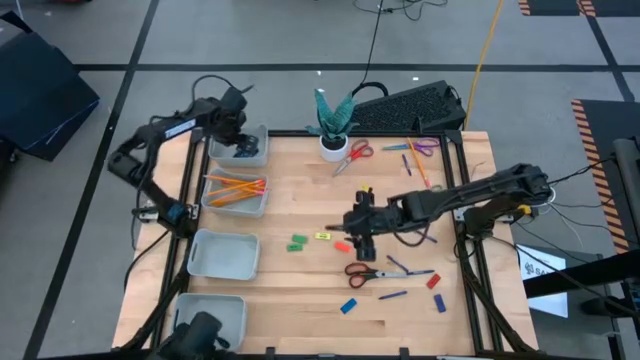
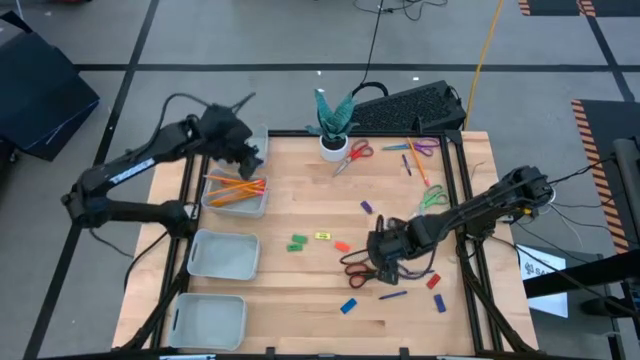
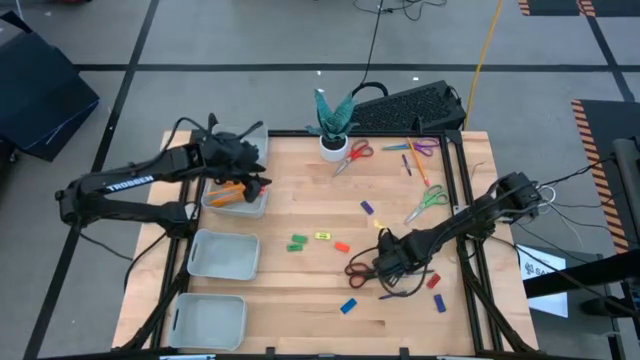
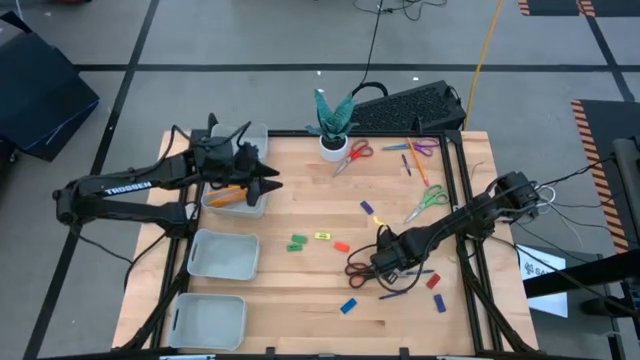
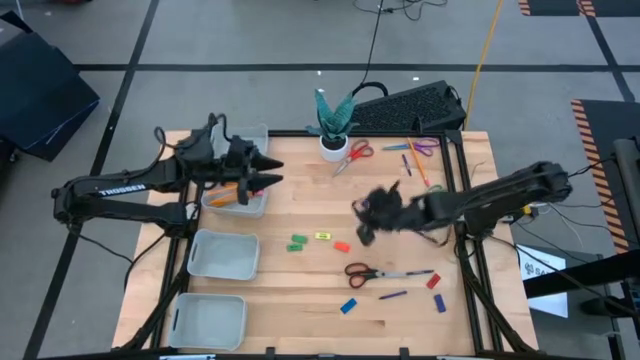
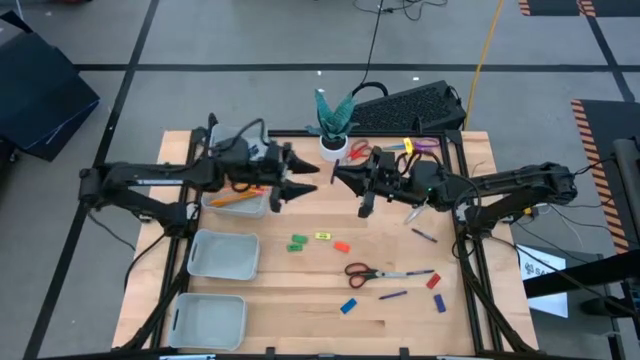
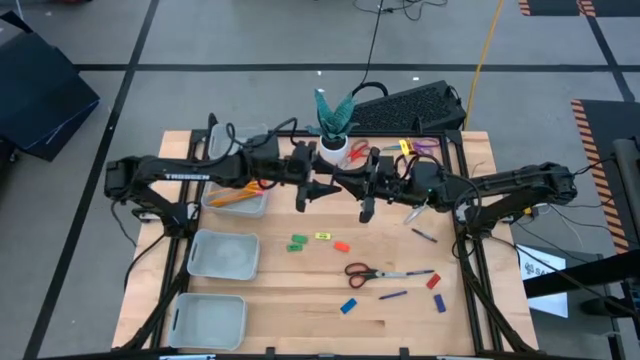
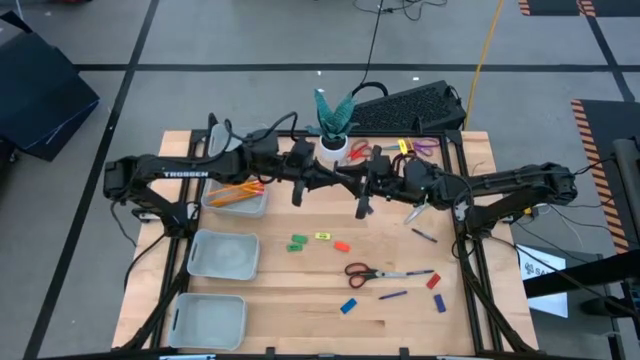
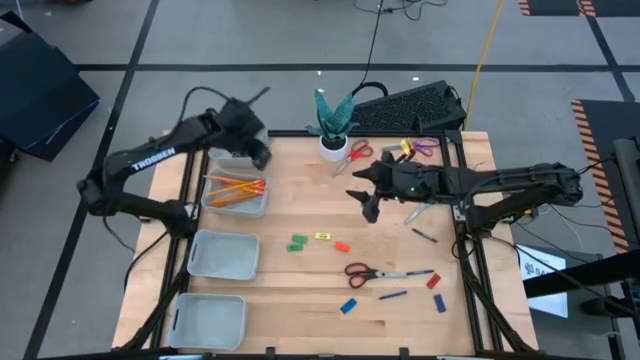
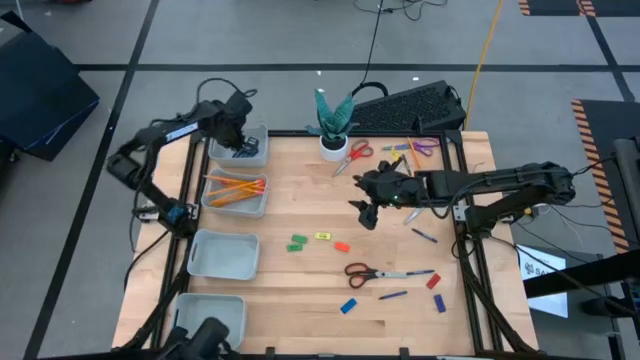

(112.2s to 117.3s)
Task: Sort crayons/erasers/pens/pencils in bins
Put the blue crayon into the top gray bin

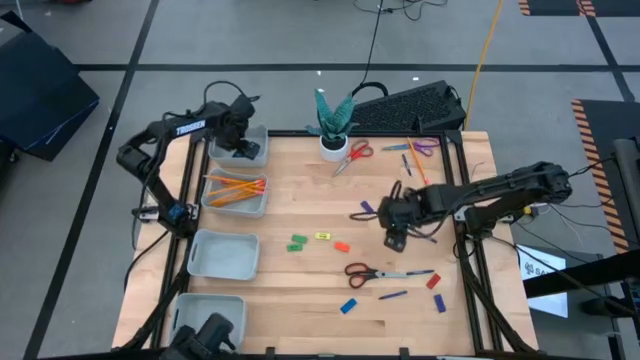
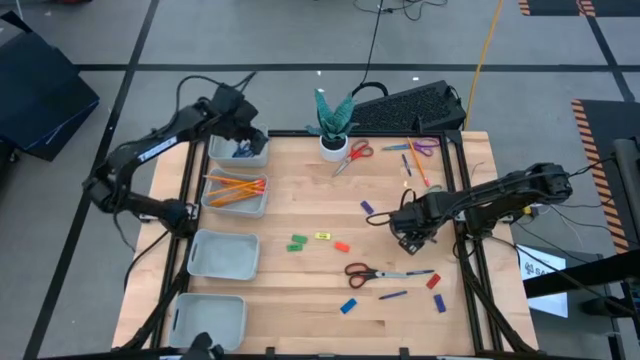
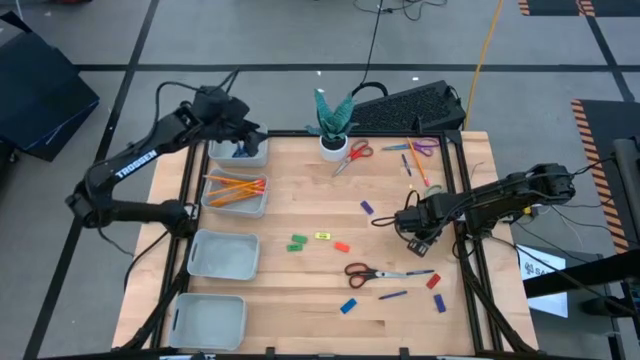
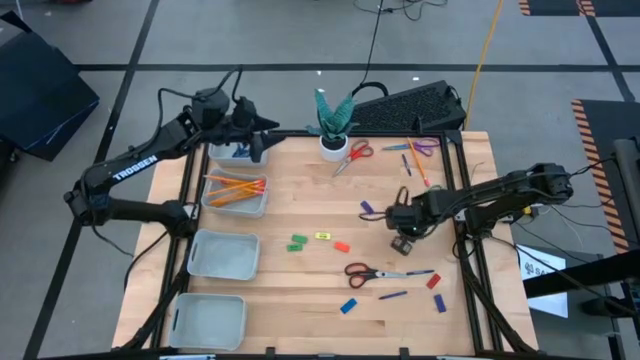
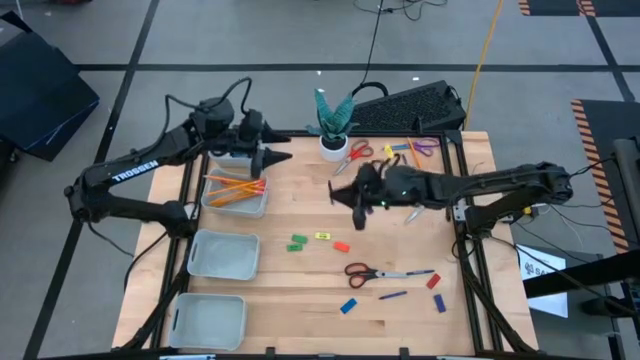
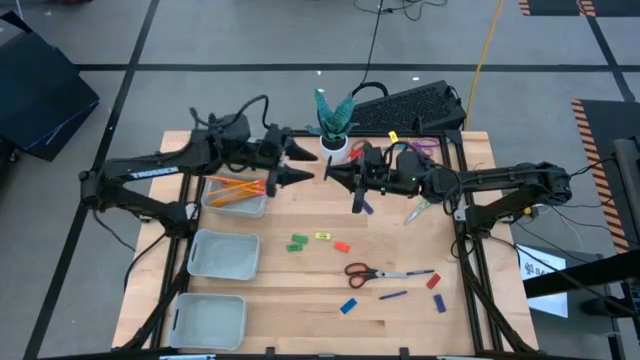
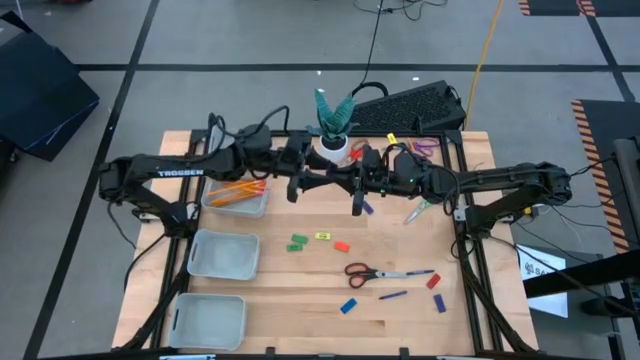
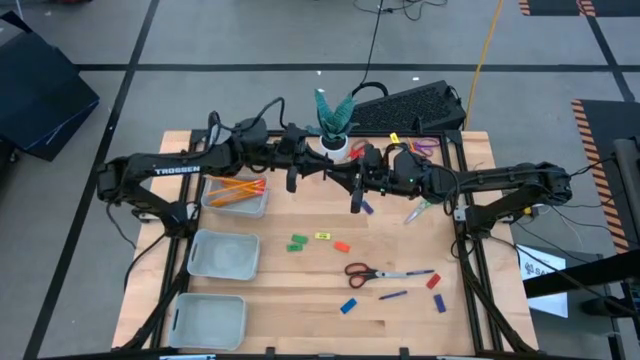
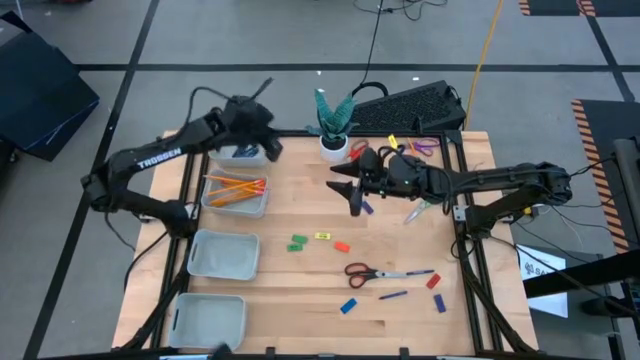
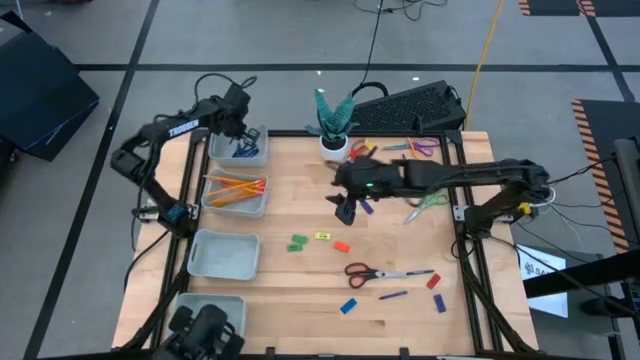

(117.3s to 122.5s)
Put the blue crayon into the top gray bin

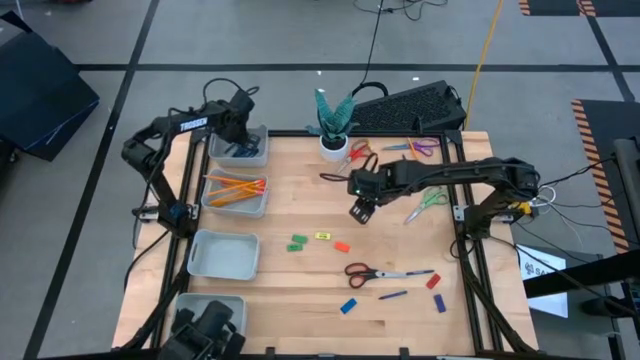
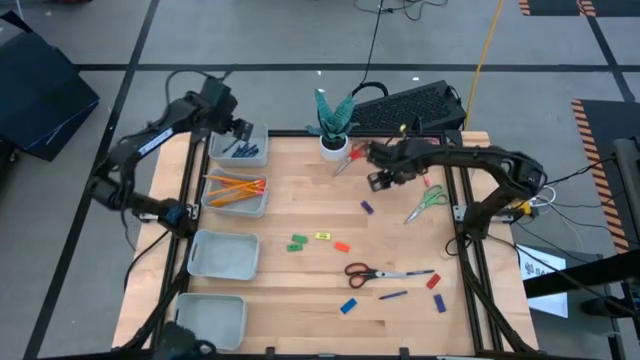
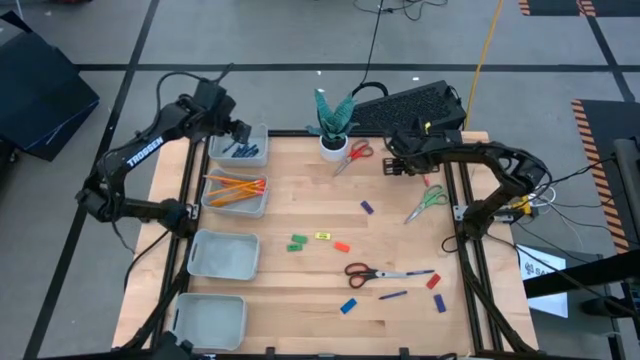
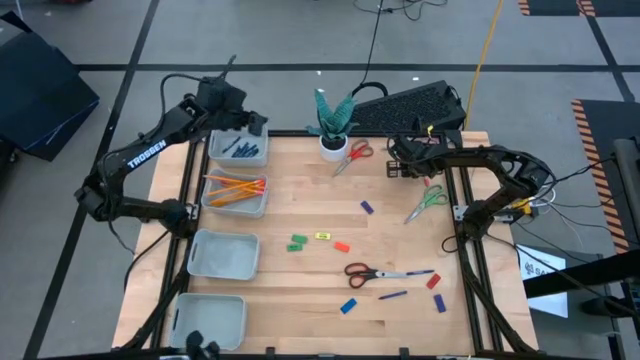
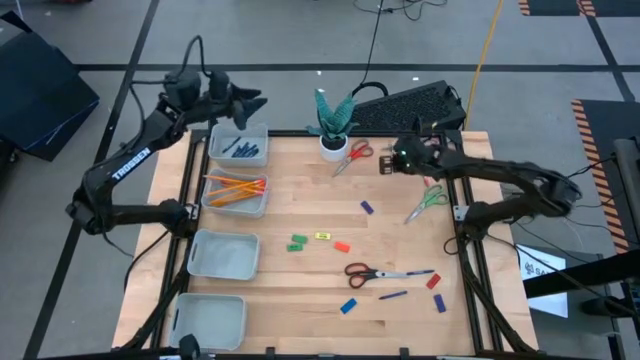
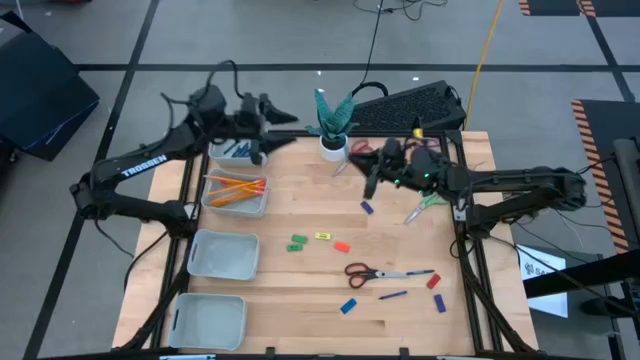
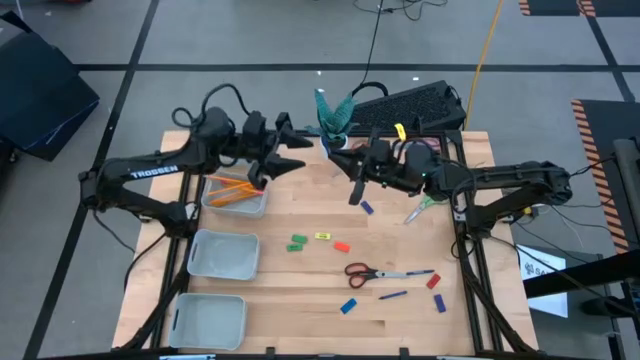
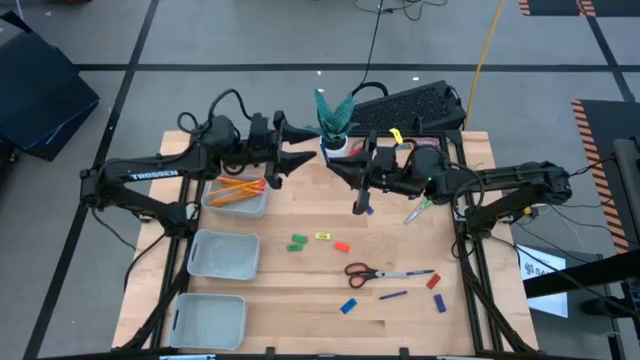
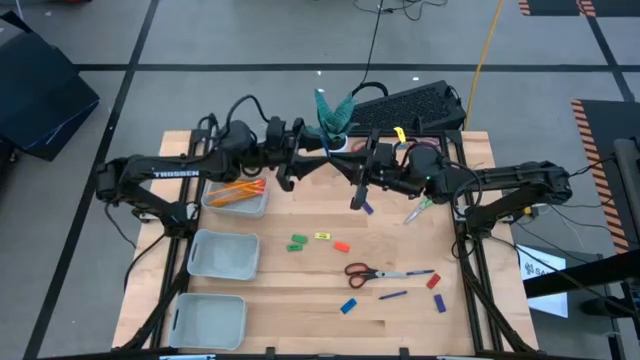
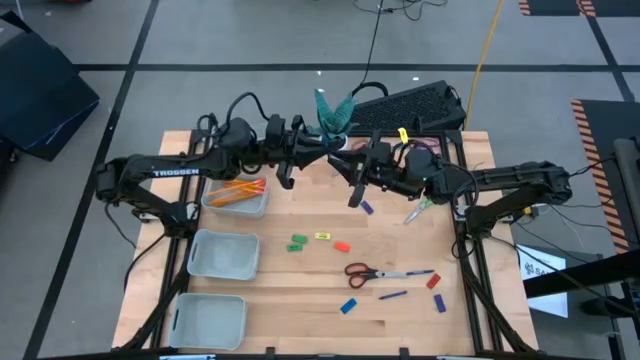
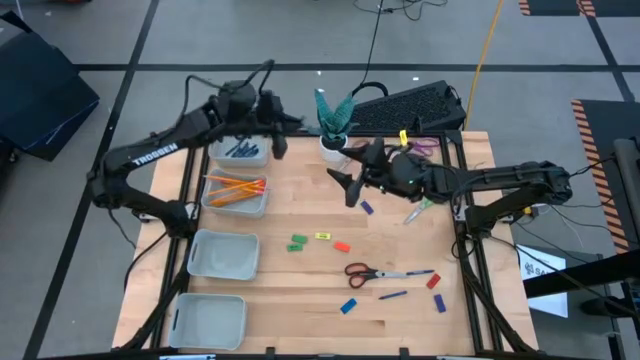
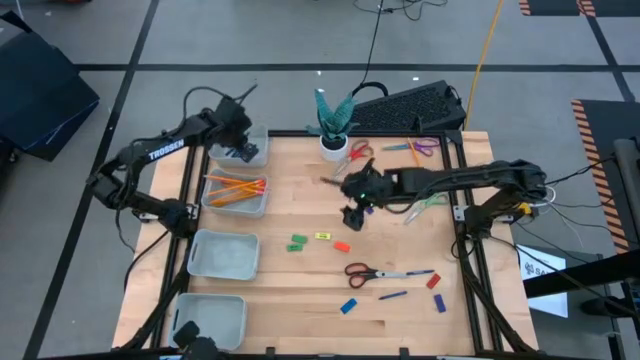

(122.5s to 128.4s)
Put the blue crayon into the top gray bin

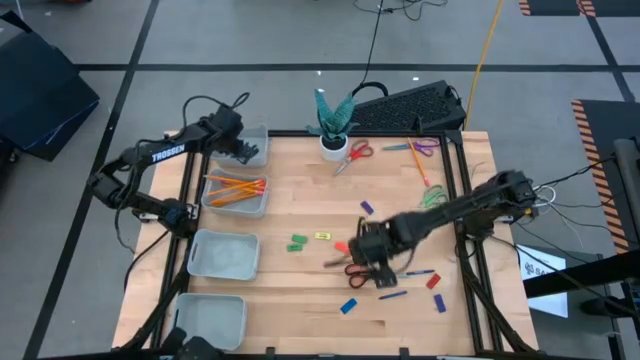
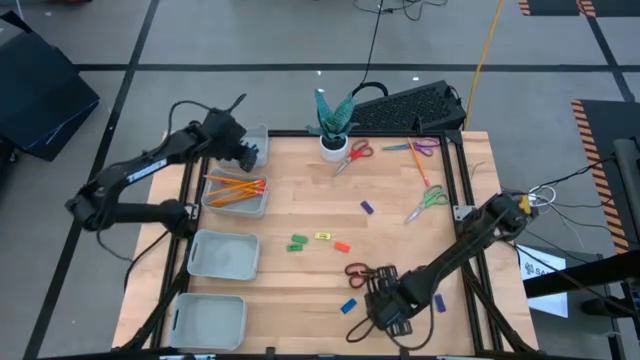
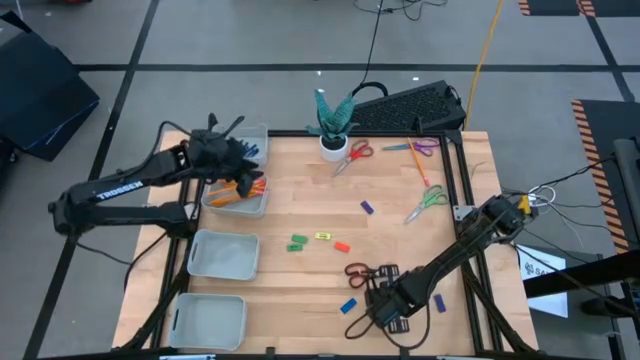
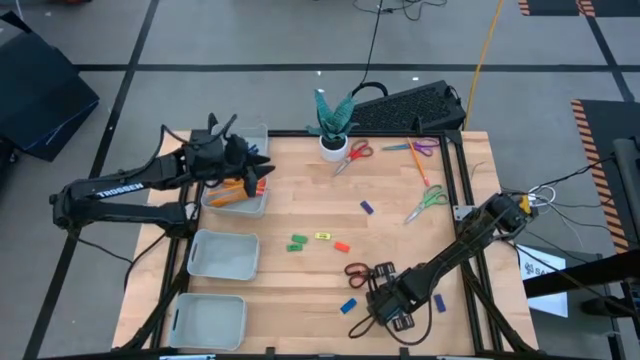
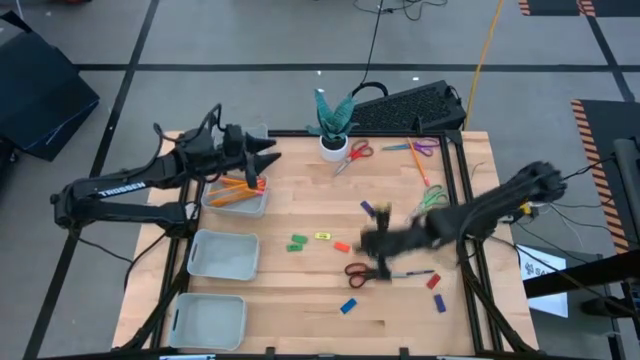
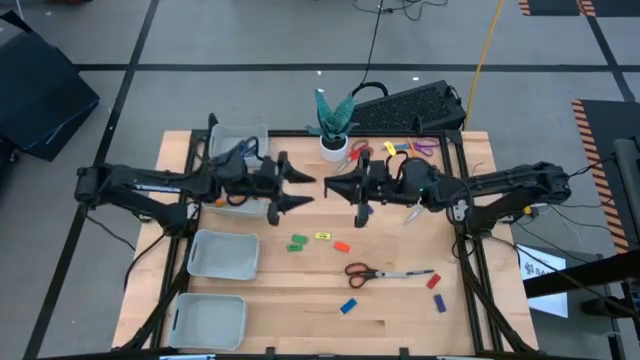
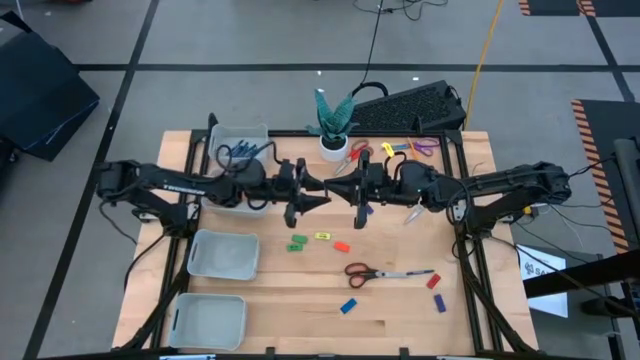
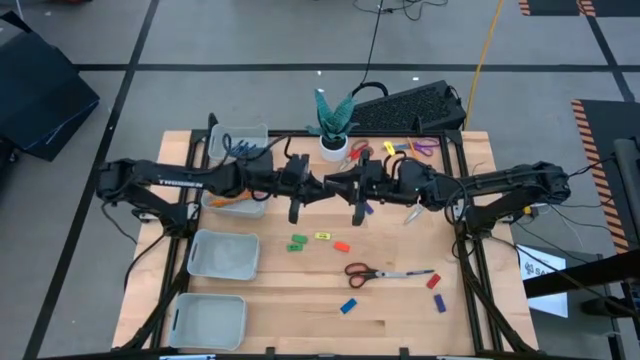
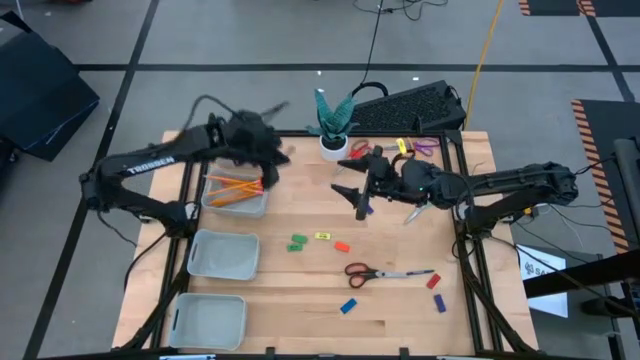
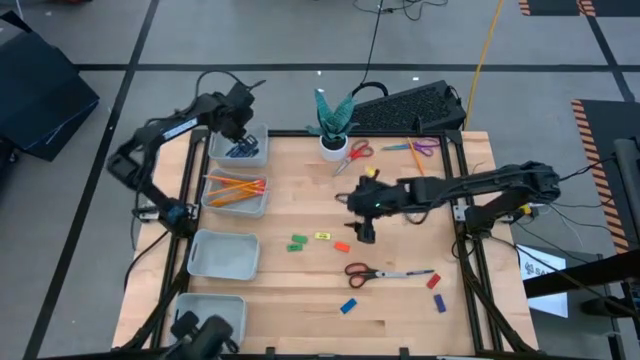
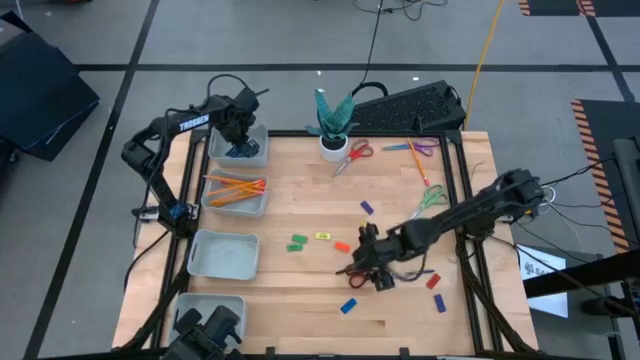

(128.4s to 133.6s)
Put the blue crayon into the top gray bin
